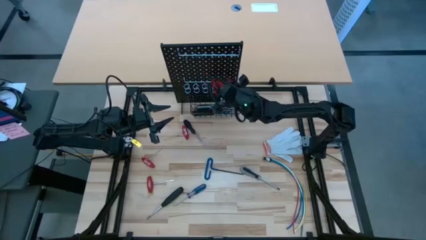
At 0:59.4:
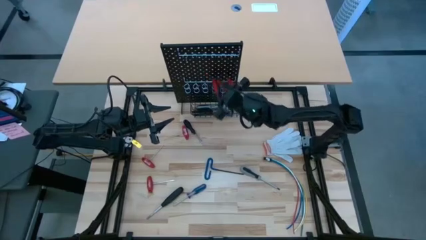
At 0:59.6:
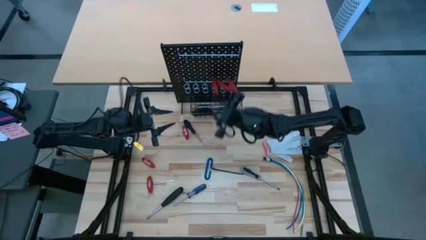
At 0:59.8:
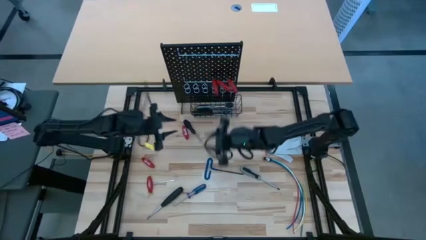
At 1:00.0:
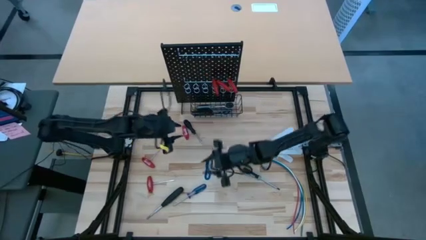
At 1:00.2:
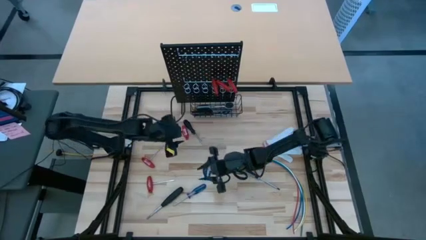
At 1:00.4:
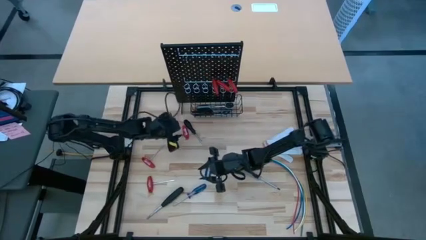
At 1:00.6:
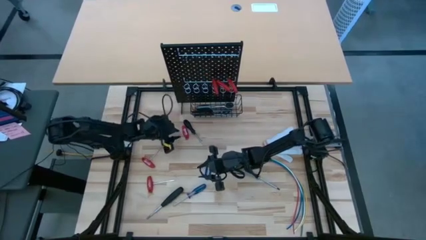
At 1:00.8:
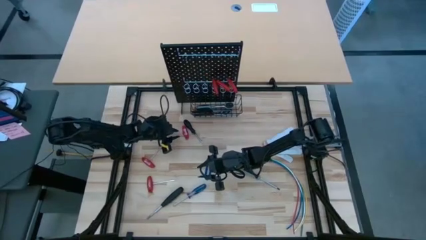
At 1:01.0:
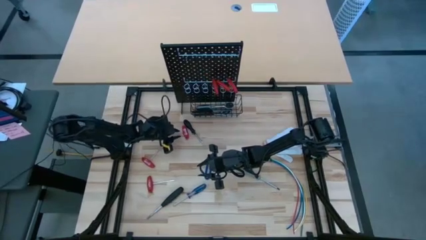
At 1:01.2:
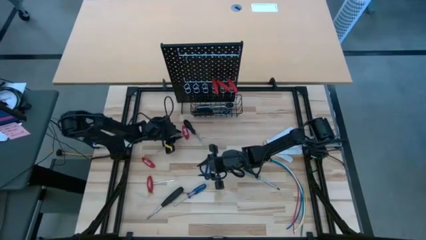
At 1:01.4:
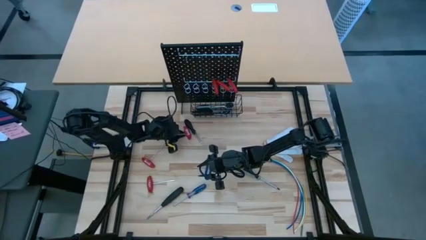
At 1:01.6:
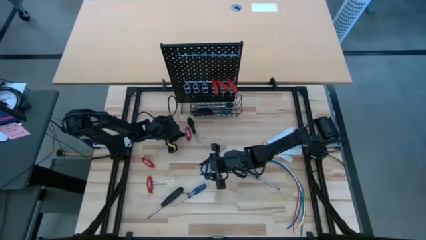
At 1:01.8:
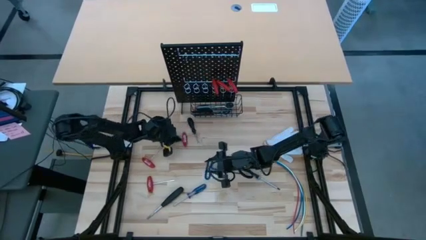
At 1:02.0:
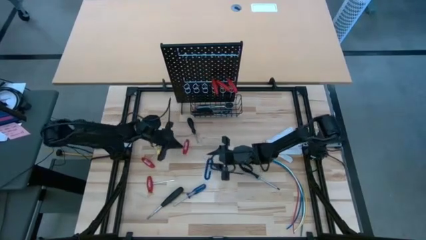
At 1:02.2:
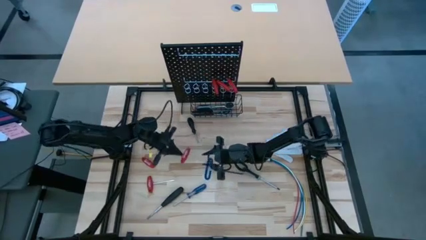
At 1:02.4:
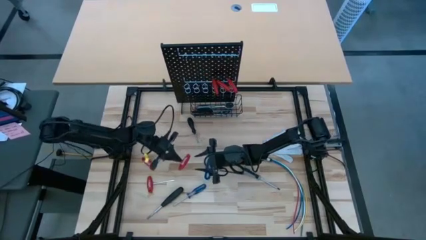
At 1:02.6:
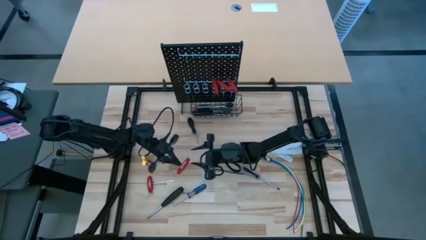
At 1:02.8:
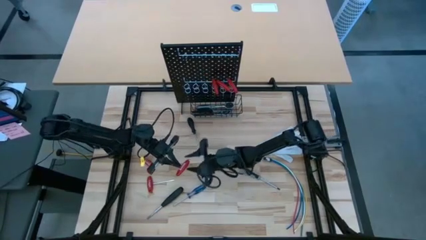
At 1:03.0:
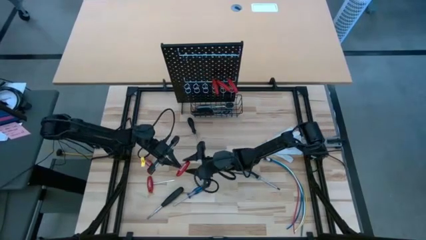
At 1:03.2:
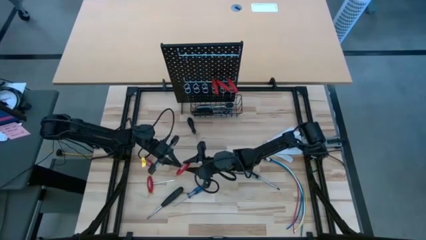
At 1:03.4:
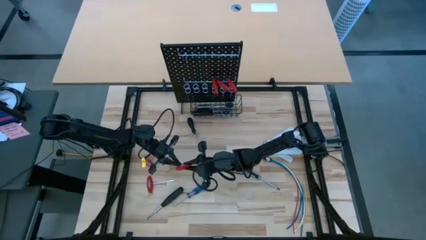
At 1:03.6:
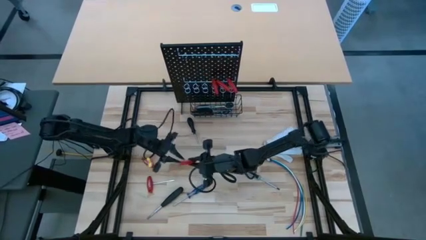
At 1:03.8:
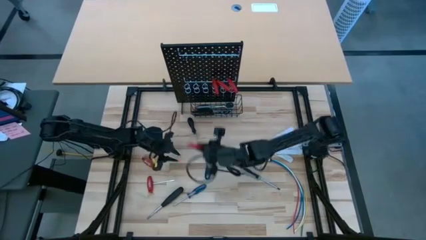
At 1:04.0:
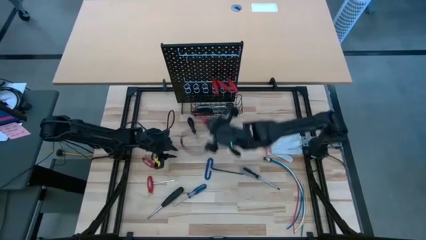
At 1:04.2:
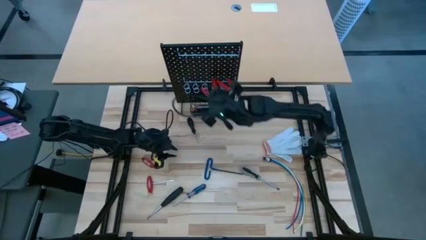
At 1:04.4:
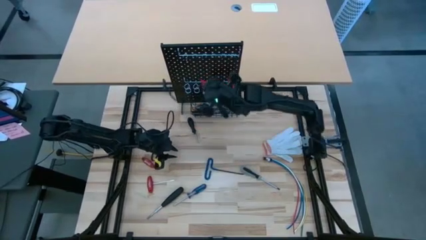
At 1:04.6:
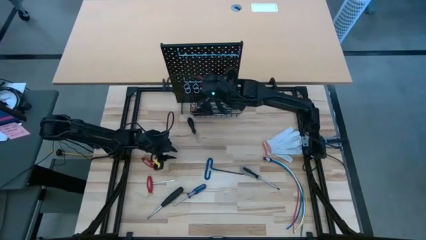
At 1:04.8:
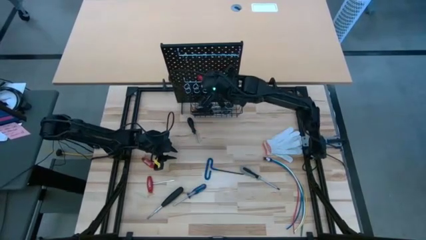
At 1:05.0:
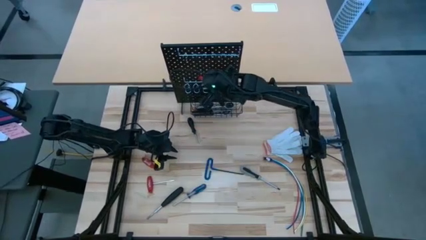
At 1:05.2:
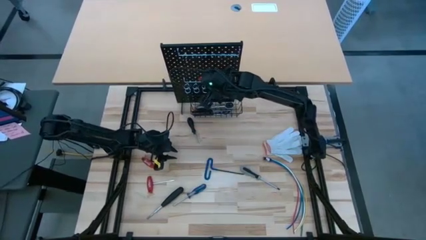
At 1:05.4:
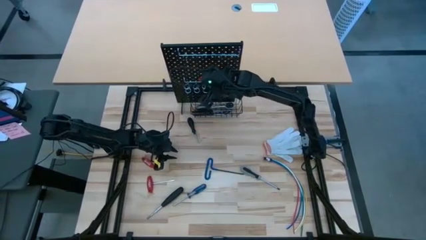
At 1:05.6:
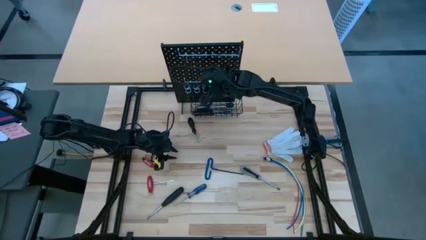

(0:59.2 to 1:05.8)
Task: Hang tools onto peg board
Hang the red Allen wrench on the pegboard

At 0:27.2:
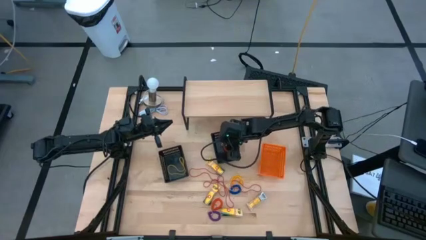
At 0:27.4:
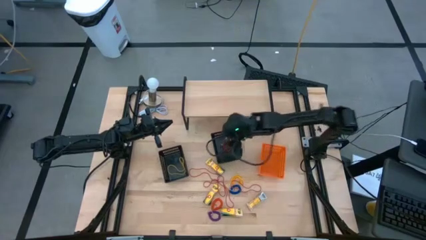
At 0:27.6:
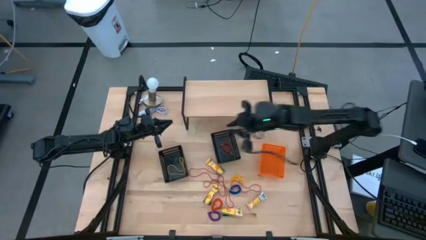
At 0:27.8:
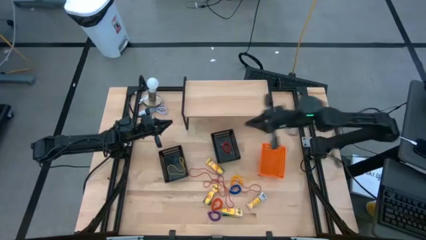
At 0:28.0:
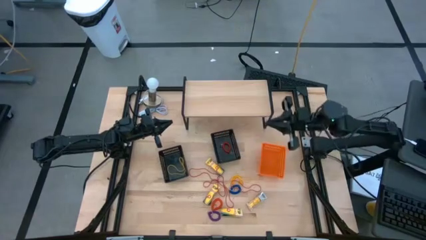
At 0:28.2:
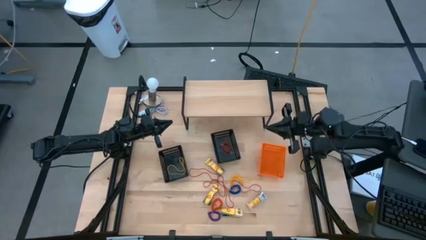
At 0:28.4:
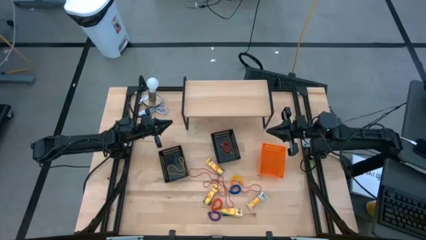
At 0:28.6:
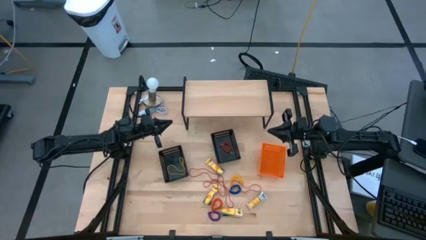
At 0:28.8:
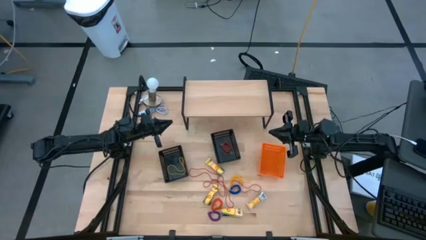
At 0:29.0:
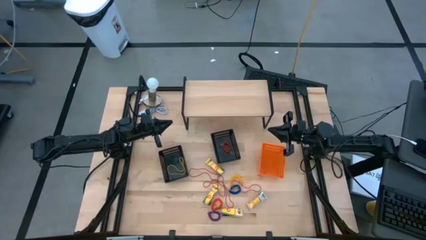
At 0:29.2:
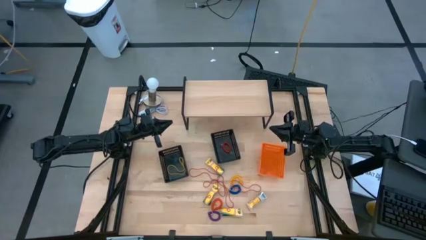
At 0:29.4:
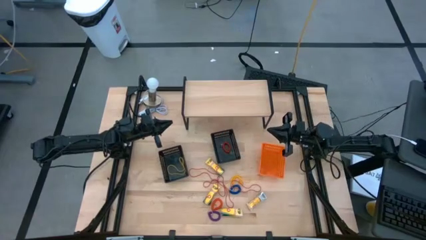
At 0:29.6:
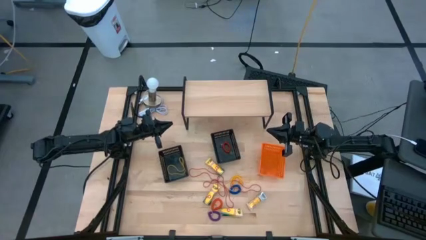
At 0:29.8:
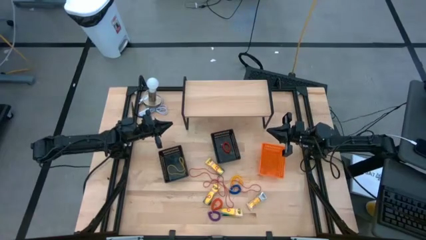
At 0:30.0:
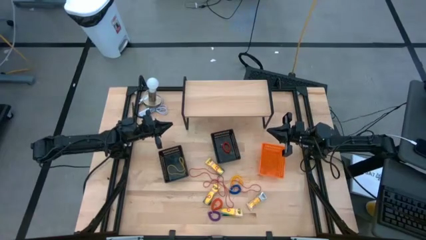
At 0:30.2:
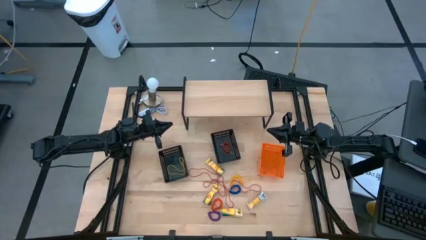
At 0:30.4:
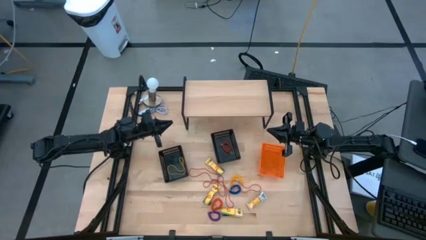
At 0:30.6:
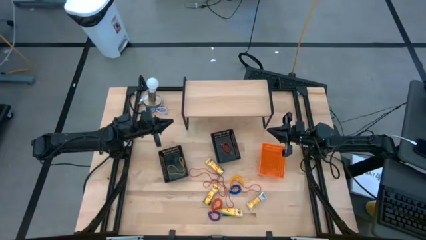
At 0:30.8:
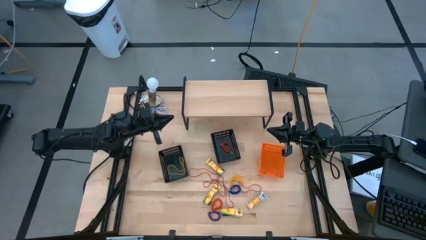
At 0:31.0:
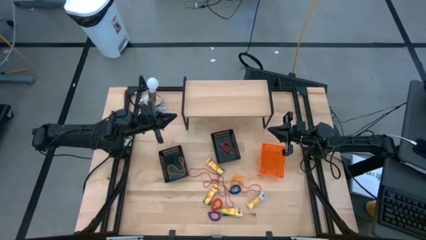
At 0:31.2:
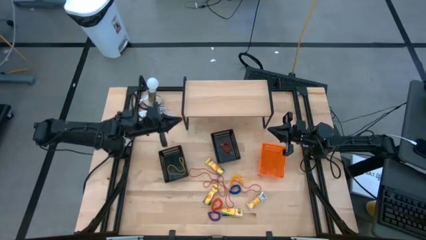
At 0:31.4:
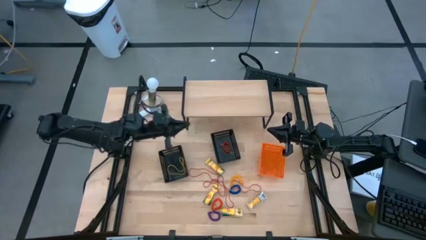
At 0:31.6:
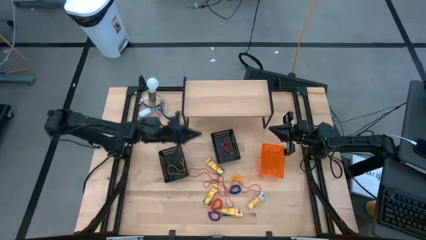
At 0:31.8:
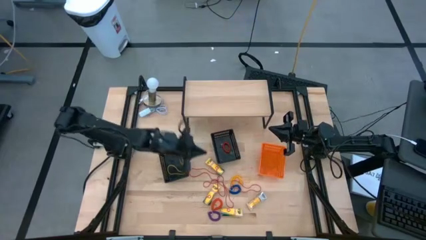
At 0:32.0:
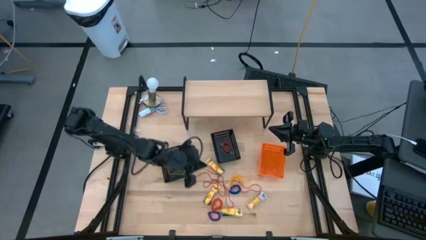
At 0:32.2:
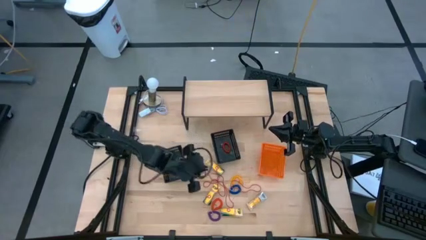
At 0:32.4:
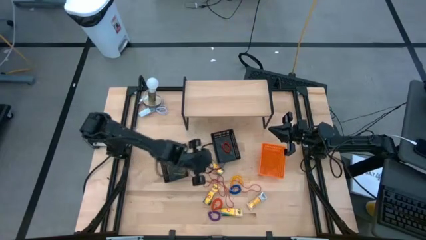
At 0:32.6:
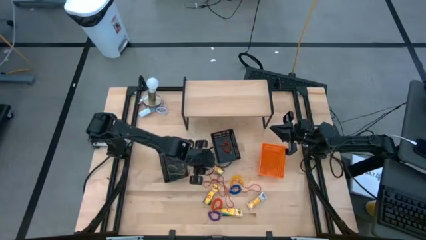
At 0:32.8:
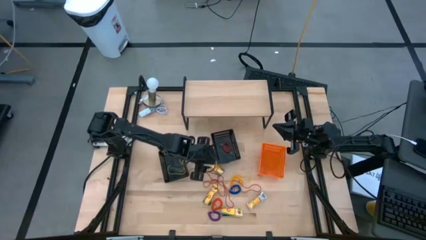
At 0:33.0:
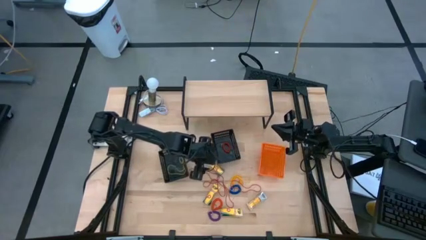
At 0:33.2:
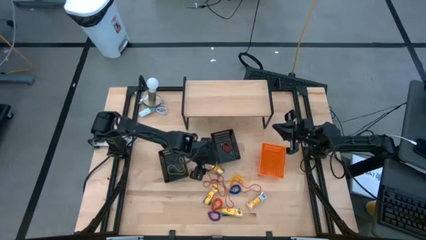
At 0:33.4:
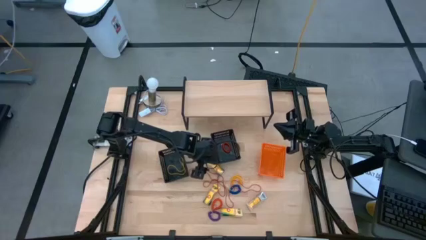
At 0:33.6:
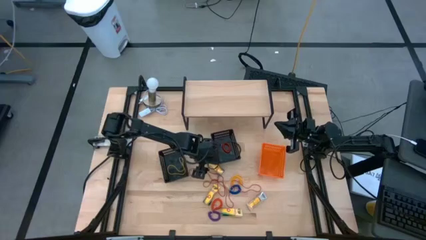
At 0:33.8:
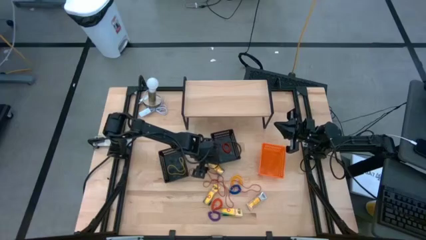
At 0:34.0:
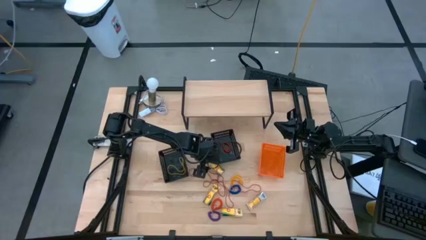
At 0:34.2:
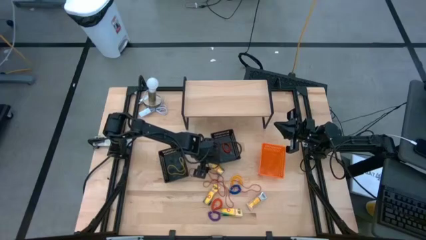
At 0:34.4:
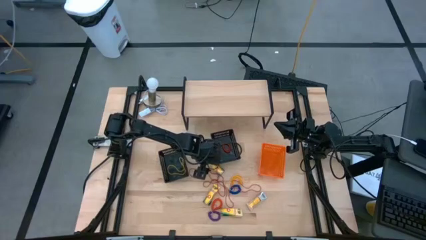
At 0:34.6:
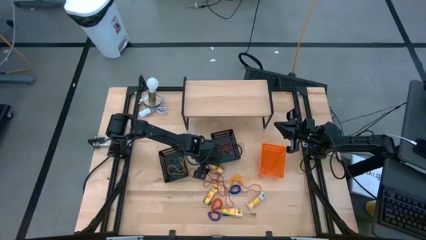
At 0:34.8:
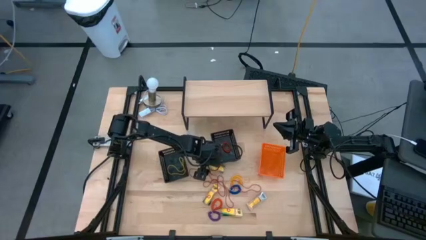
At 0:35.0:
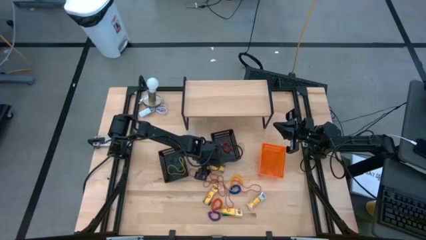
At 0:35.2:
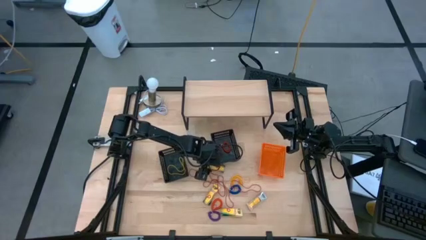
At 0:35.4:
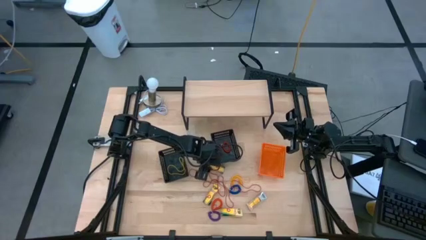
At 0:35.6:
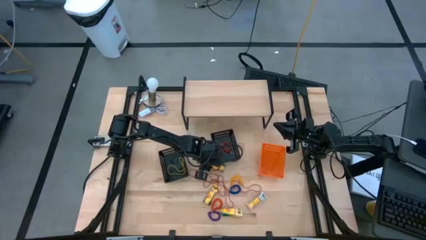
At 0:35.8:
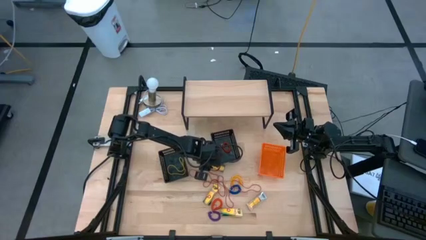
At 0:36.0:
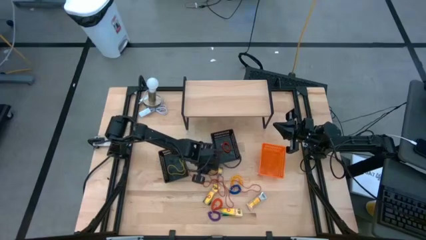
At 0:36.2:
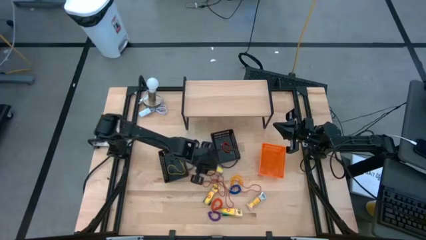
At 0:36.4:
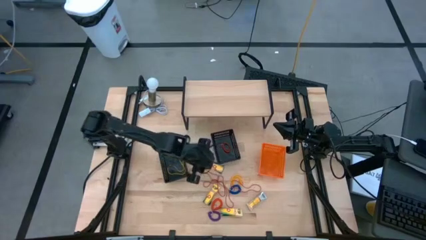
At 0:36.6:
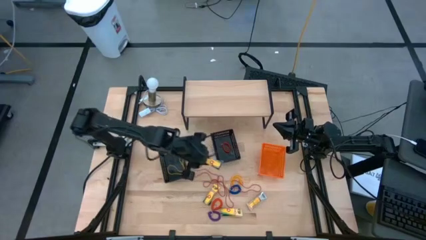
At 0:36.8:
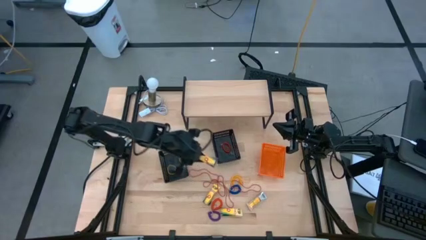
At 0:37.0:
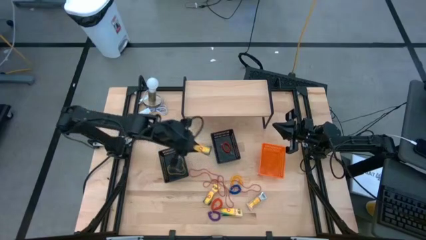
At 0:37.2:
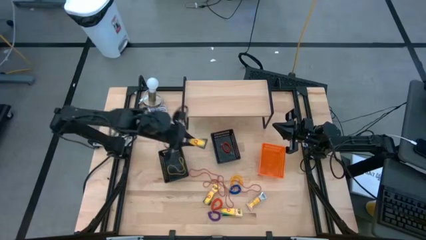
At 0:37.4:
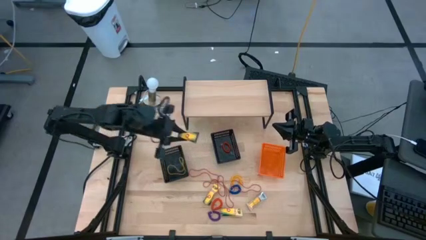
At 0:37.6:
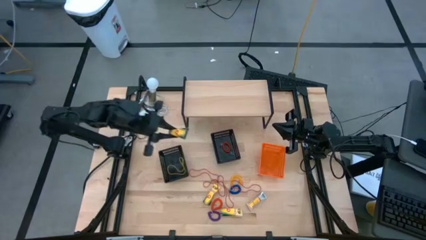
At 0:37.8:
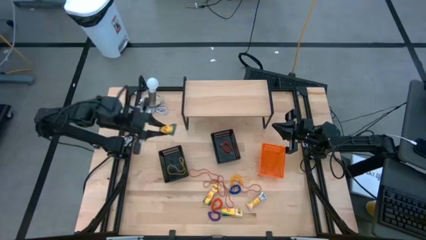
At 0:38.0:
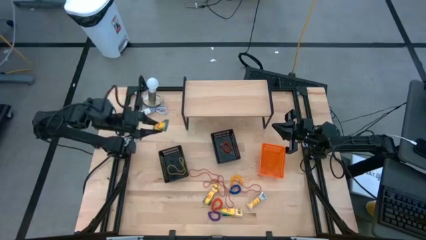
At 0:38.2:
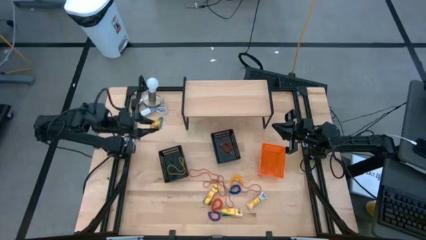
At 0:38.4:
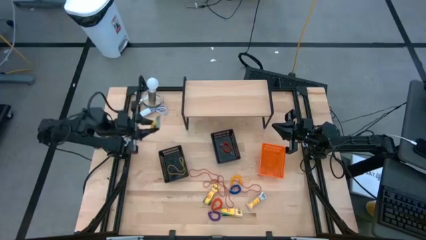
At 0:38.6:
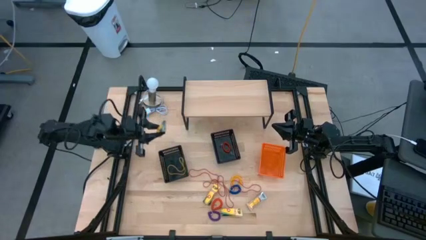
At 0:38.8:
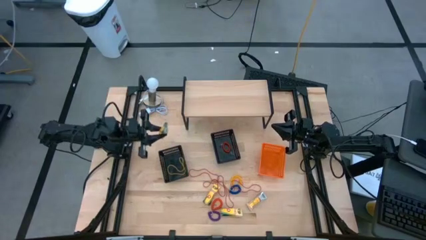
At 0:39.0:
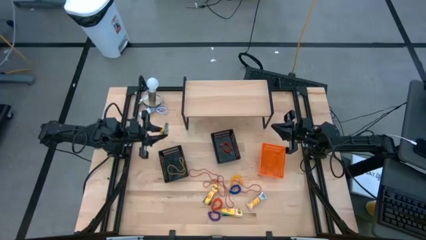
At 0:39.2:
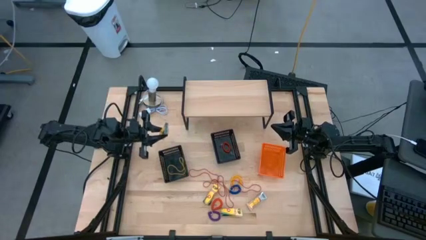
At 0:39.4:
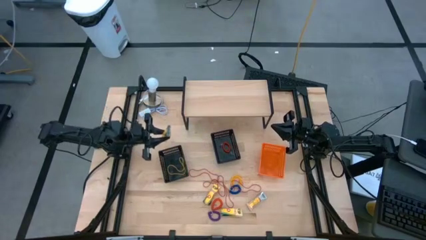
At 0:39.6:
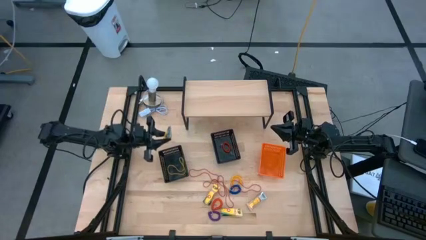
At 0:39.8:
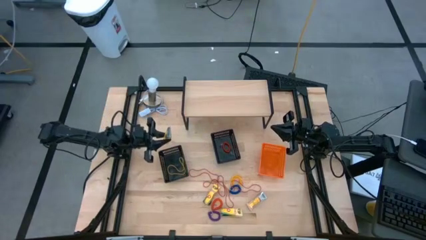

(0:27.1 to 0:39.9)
Task: Pick & Place Office Desk Supplies
Put the crayon box into the orange bin
